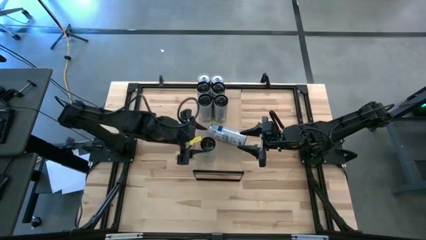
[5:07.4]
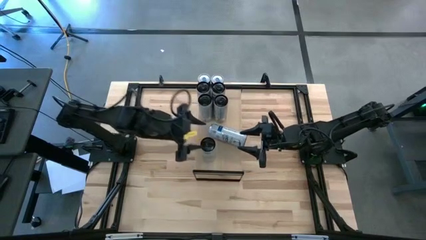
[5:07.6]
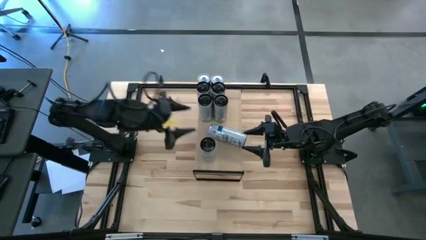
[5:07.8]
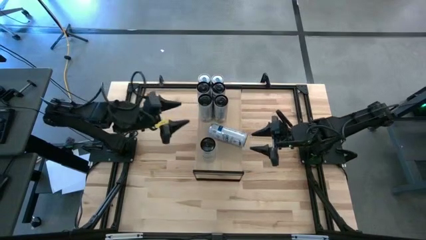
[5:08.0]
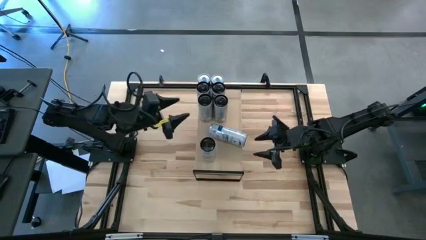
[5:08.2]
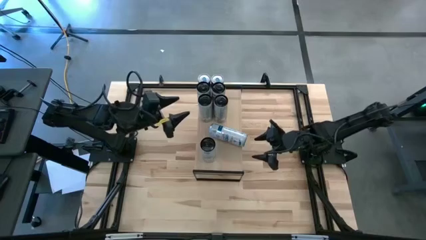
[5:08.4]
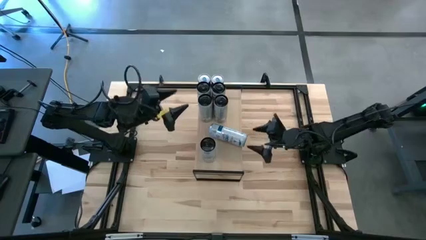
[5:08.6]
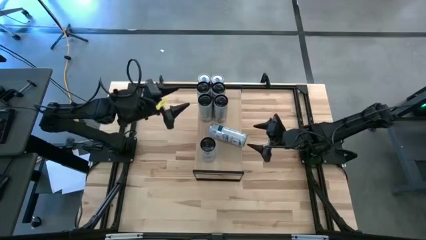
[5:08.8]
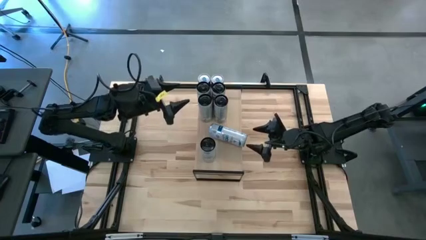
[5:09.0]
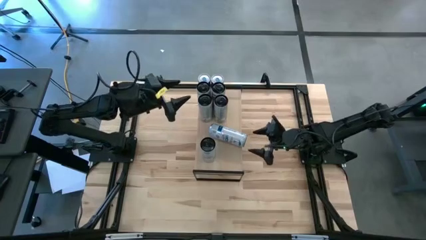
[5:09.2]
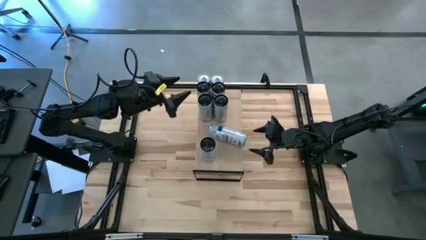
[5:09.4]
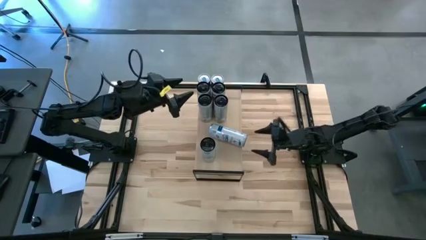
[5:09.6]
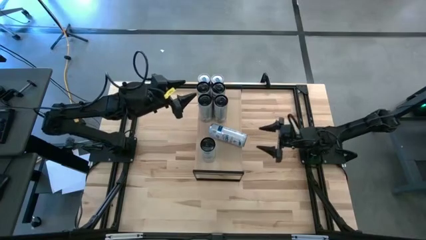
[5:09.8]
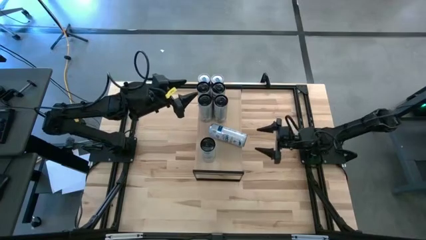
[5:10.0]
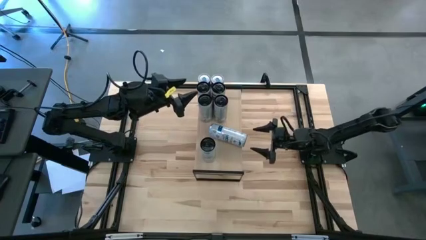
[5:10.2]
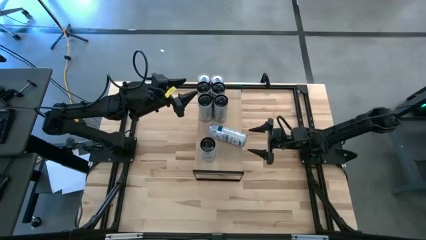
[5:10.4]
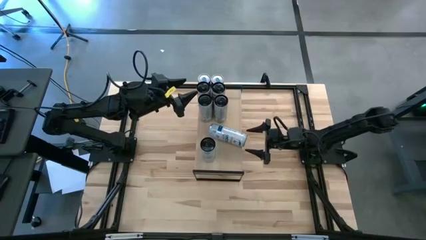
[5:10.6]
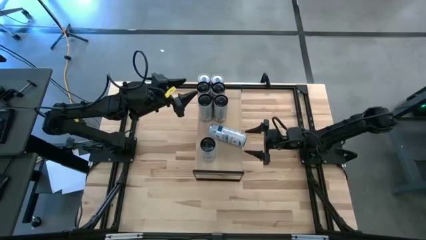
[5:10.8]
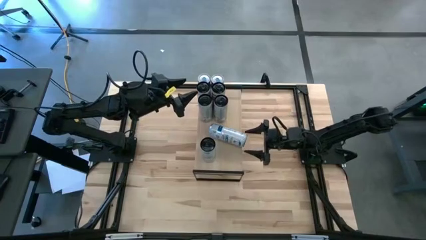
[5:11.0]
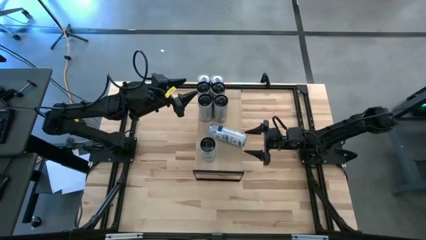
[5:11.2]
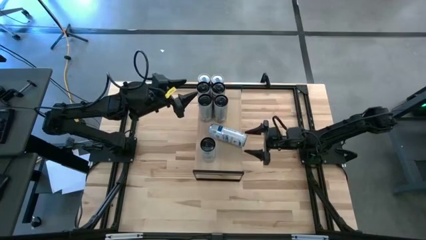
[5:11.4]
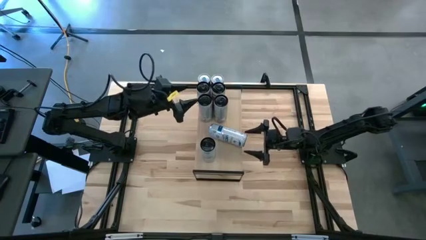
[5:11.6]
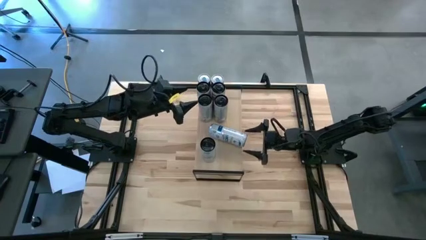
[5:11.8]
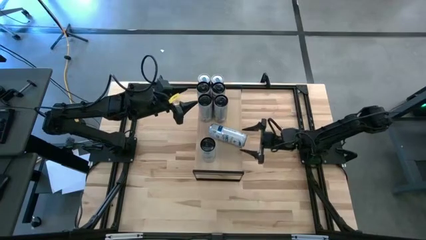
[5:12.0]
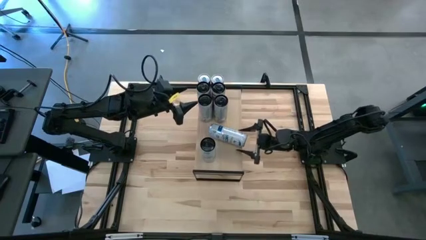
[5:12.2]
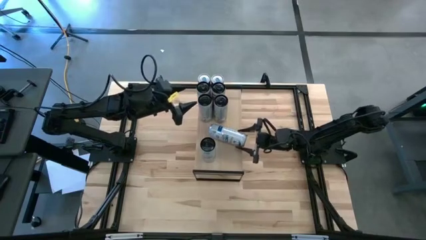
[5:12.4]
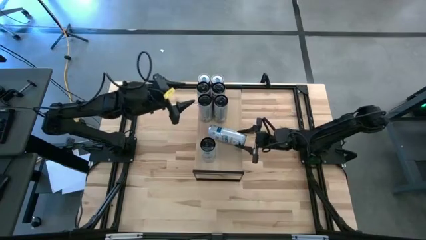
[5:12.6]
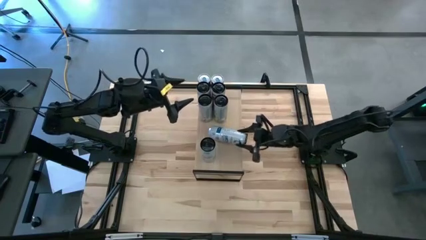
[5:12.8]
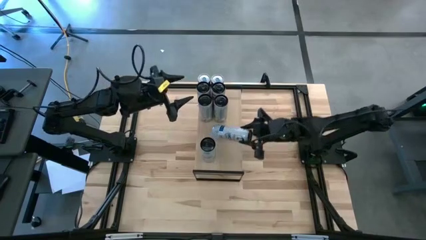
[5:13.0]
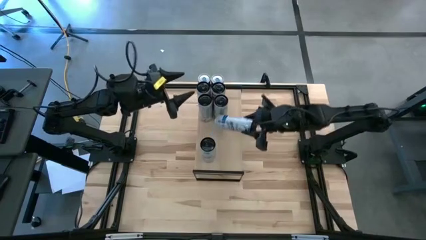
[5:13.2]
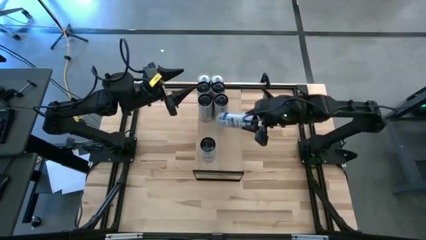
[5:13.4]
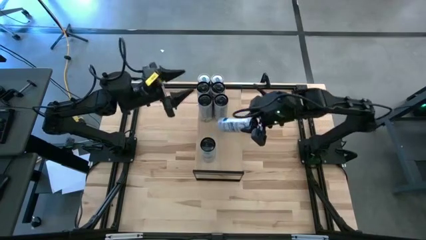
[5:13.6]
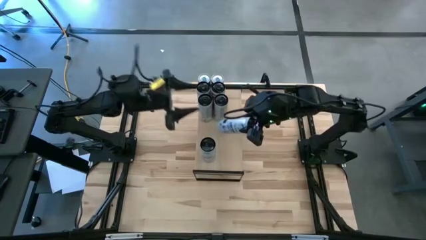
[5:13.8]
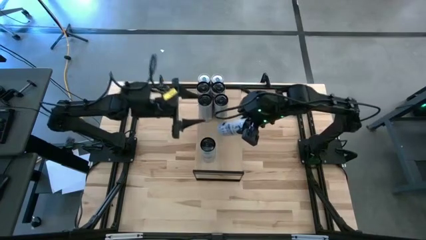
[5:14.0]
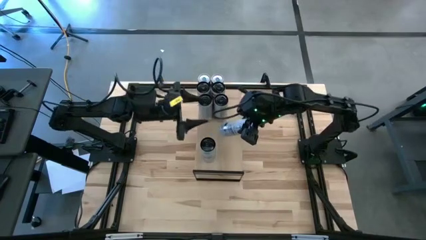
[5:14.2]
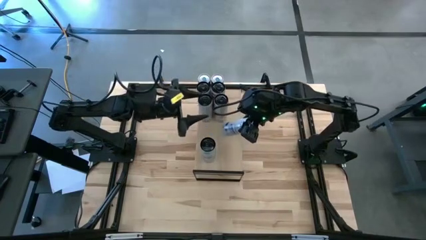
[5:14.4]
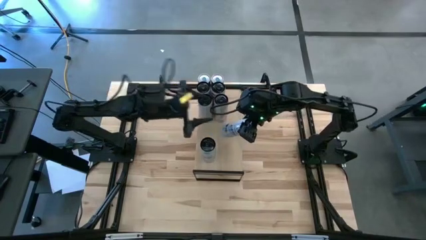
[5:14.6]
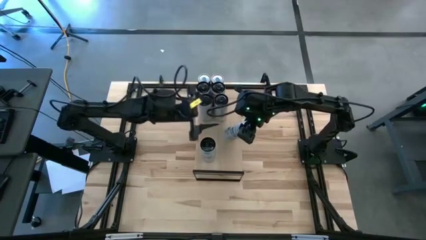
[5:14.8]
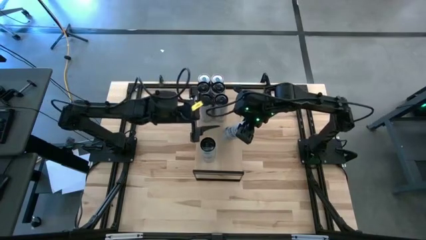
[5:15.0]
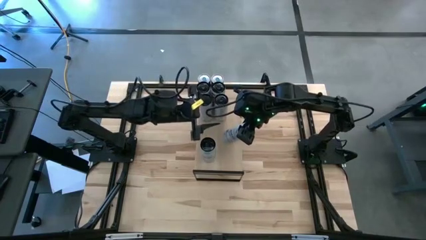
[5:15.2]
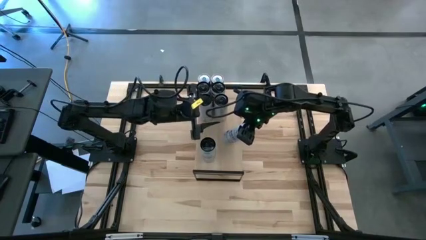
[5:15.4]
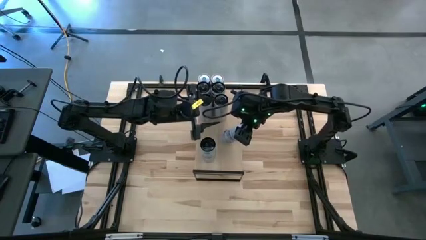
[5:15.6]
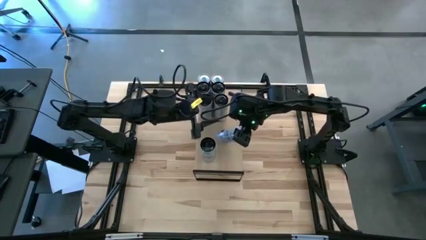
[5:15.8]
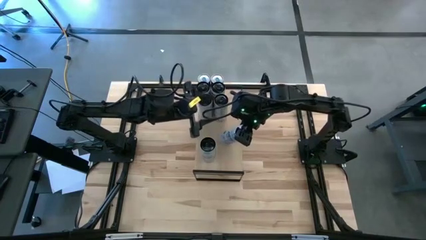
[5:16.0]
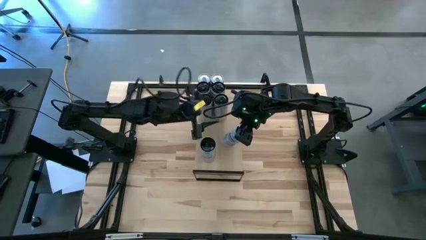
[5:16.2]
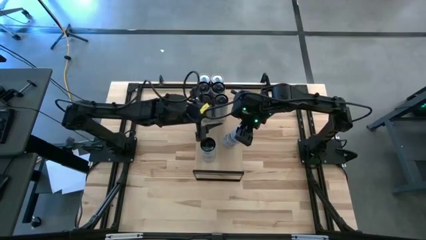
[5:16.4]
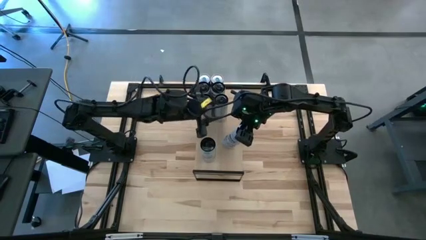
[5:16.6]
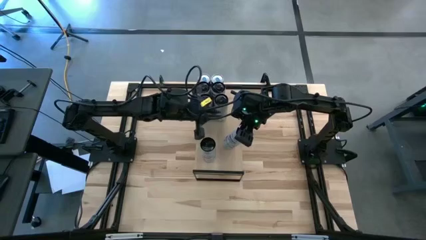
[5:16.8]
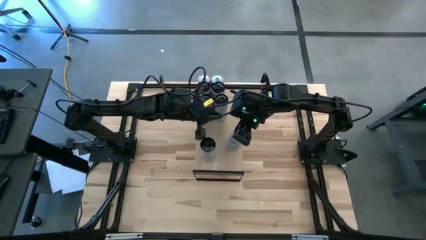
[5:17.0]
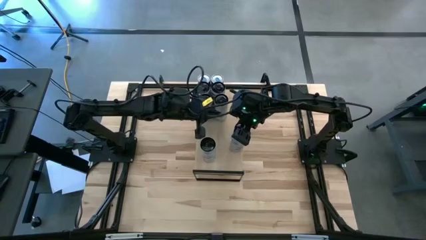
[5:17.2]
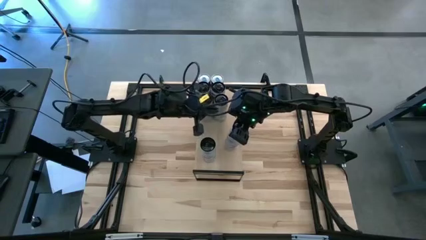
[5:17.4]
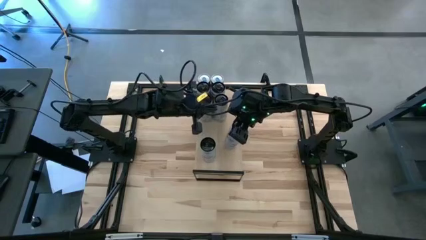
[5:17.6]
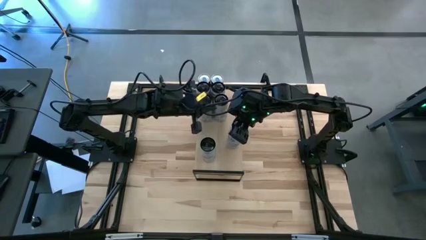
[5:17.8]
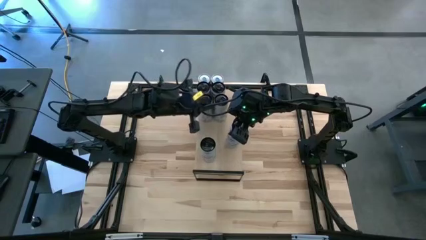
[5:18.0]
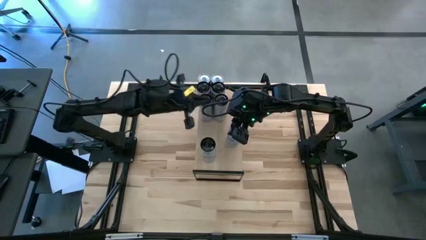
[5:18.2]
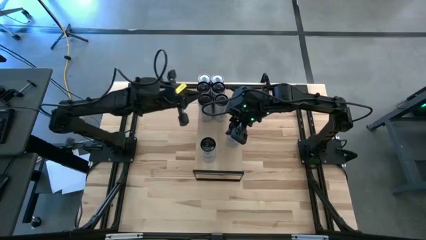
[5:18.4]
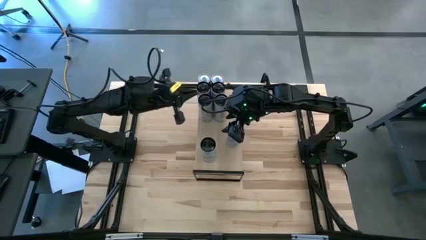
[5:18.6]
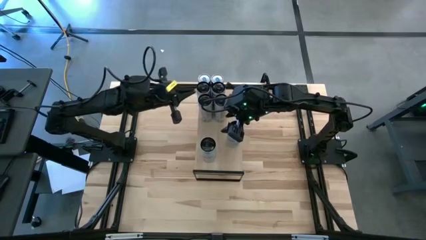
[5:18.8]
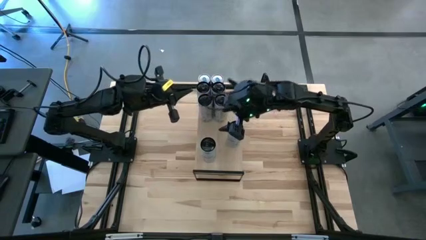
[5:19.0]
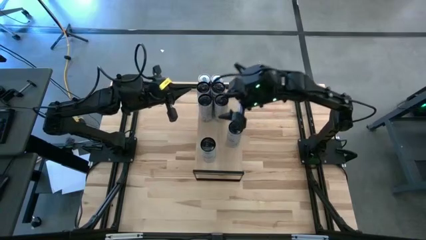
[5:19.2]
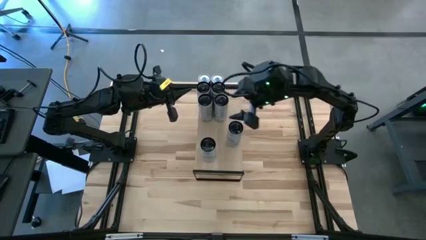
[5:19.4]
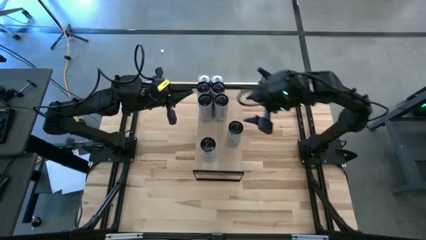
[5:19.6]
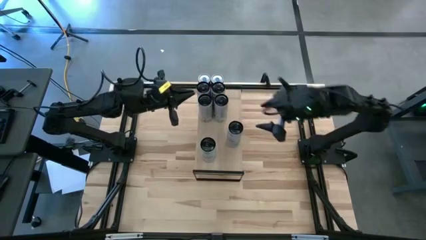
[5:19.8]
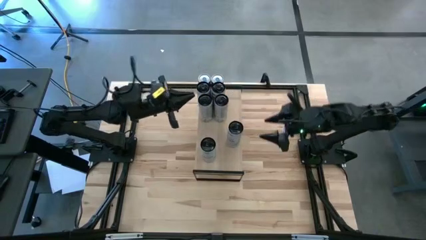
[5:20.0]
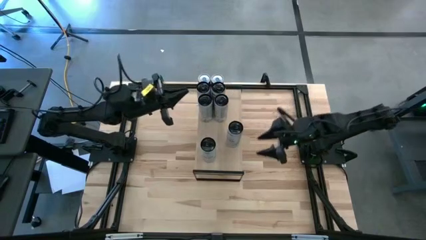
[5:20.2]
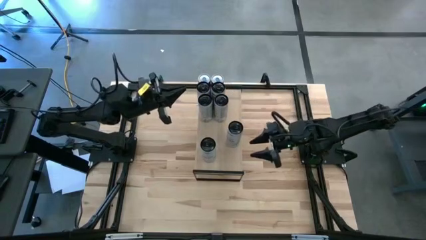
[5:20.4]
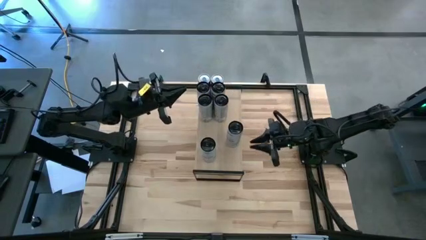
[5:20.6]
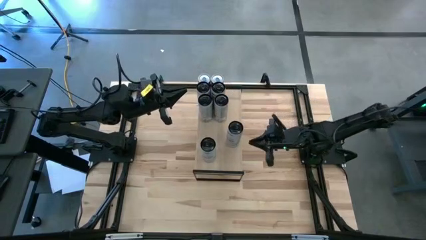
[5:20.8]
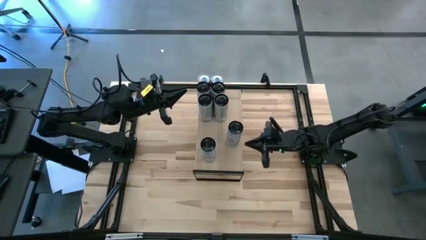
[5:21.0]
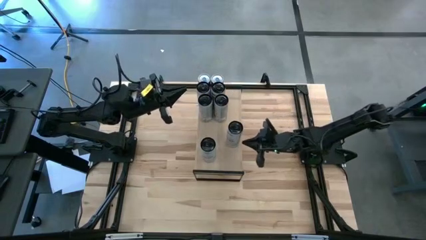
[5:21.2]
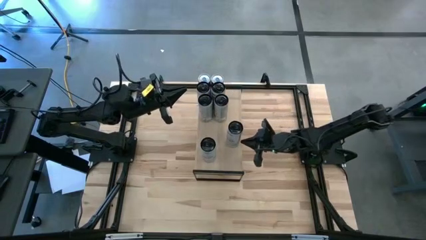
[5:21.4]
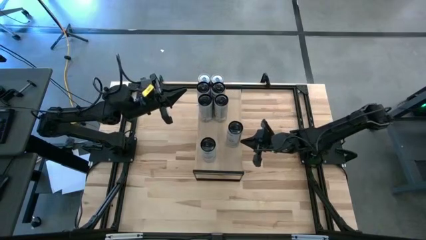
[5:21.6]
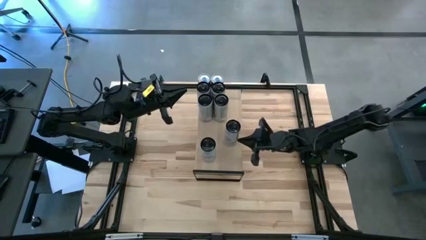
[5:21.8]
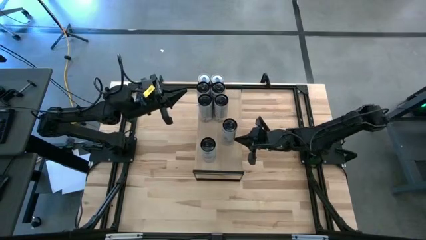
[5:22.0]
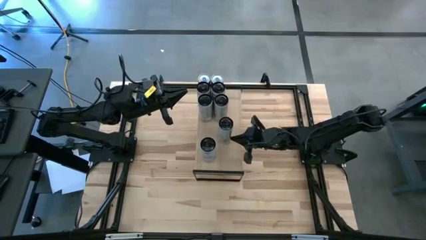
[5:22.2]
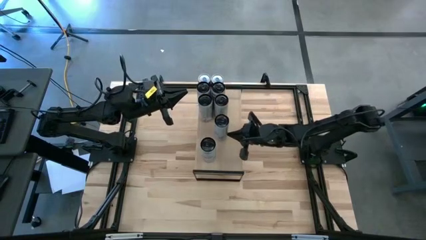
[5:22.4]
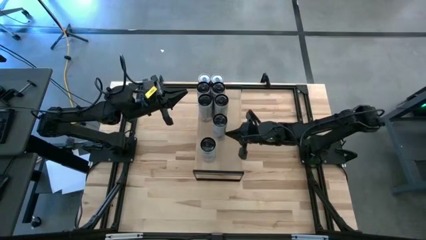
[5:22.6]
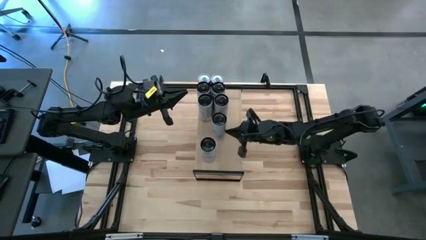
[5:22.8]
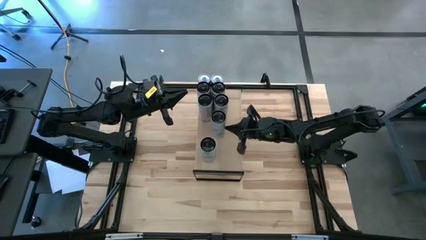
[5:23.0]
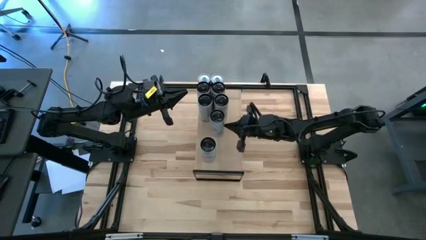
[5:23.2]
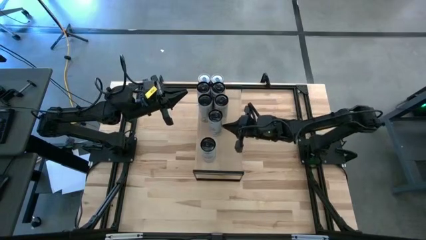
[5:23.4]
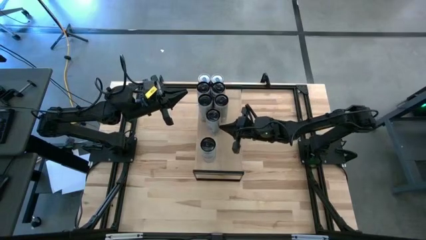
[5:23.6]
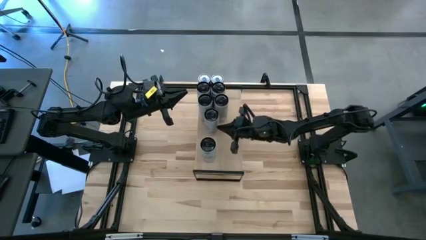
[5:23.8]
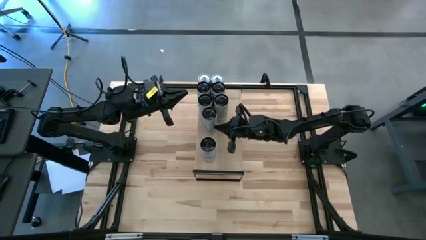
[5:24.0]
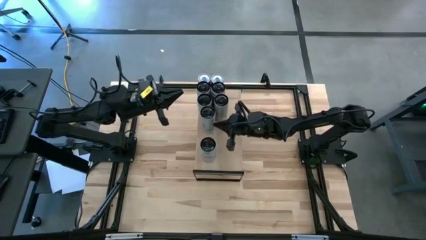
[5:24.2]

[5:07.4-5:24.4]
Task: Place canned beverage on shelf
Adjust the white blue soda can on the shelf
